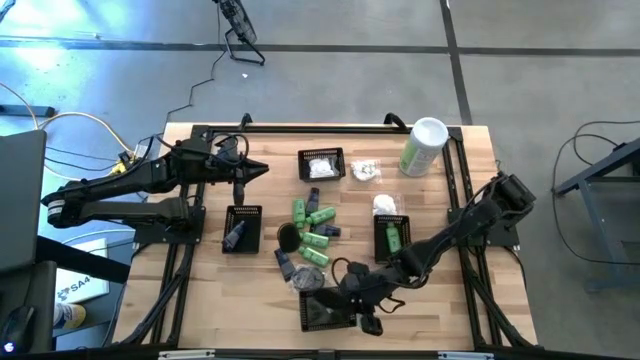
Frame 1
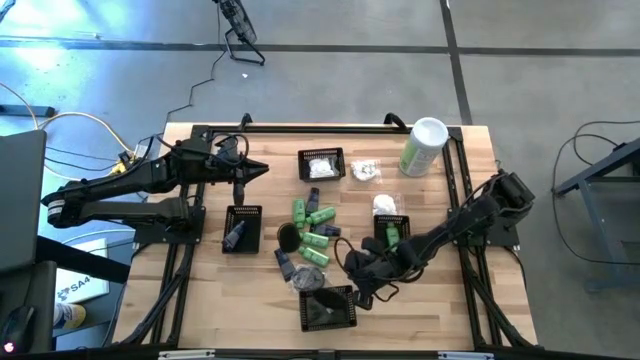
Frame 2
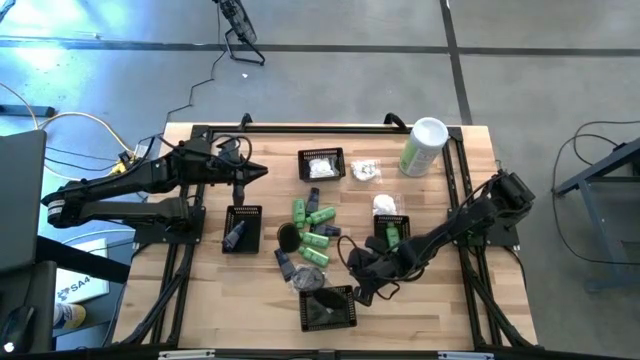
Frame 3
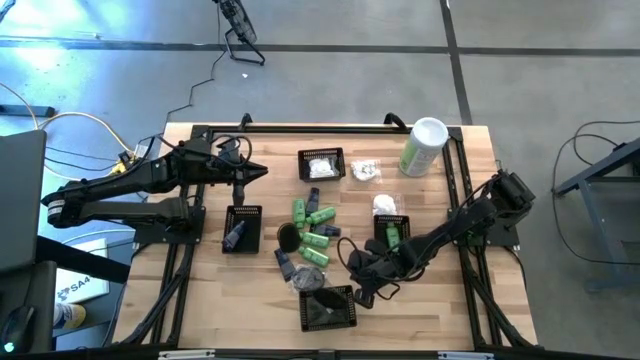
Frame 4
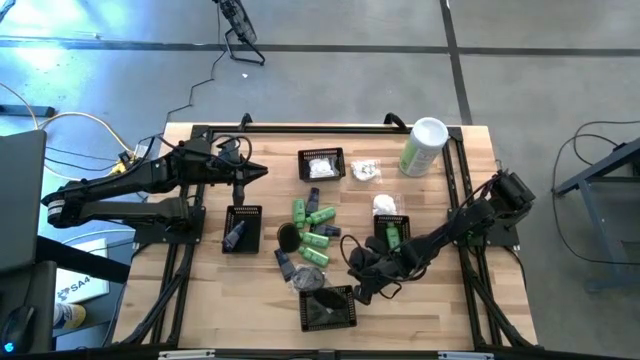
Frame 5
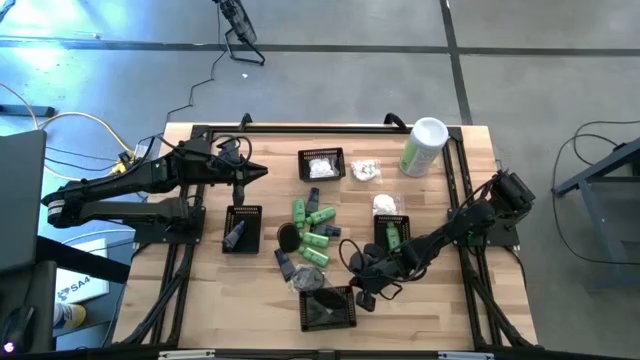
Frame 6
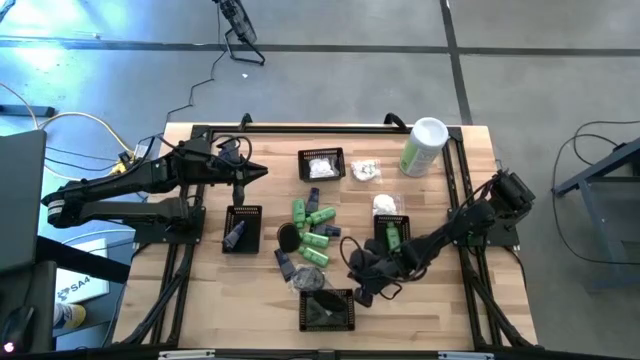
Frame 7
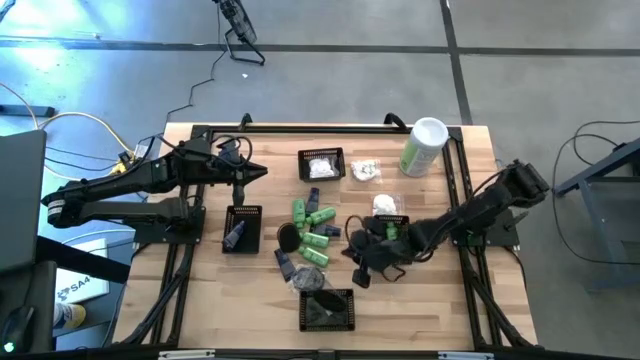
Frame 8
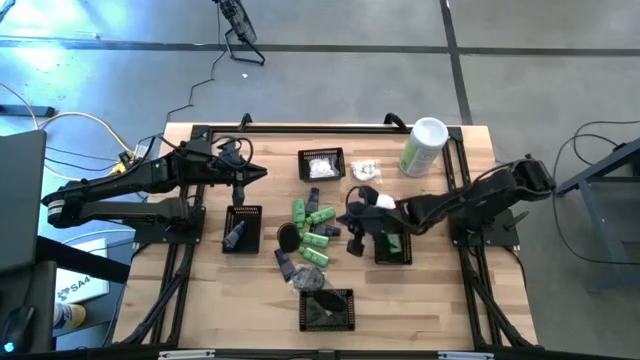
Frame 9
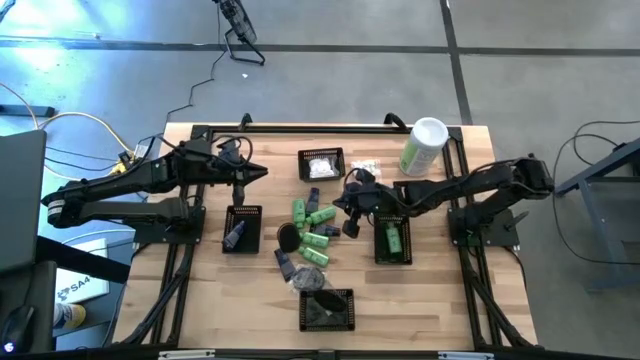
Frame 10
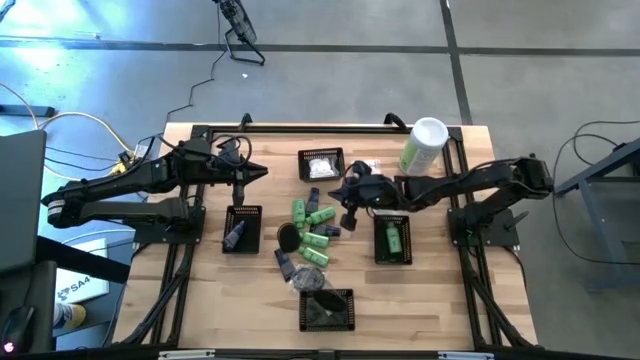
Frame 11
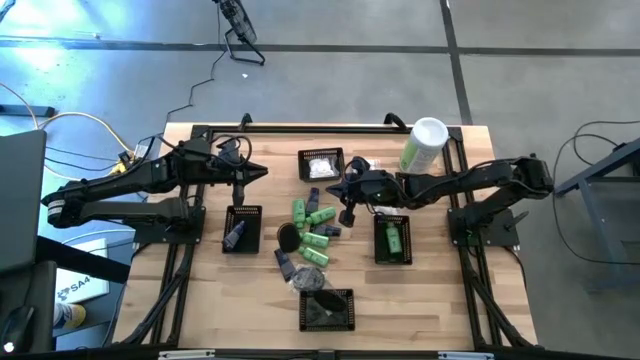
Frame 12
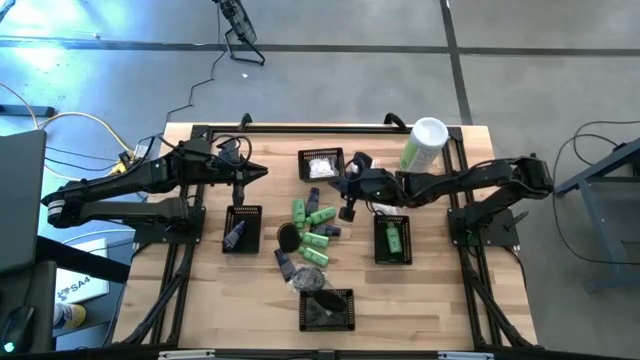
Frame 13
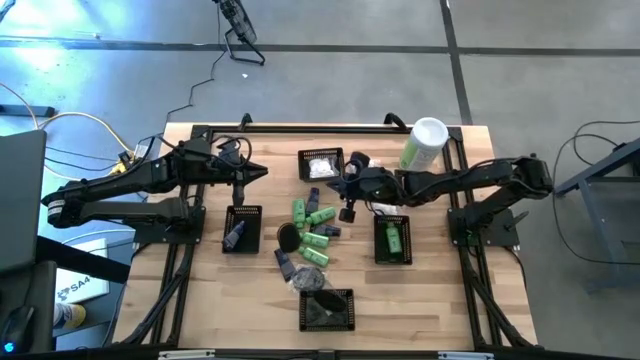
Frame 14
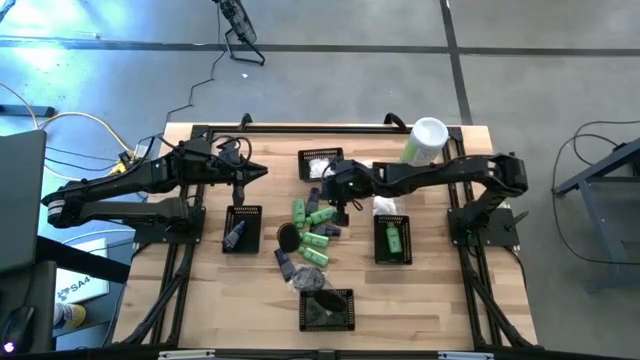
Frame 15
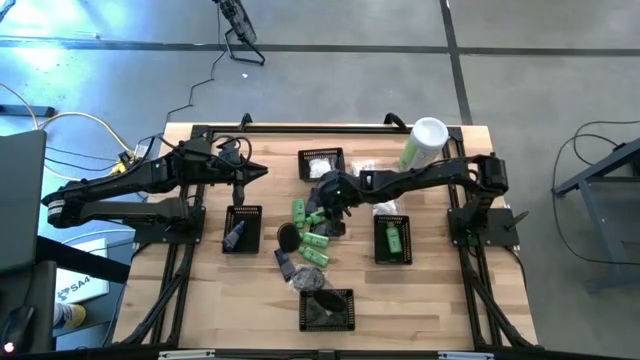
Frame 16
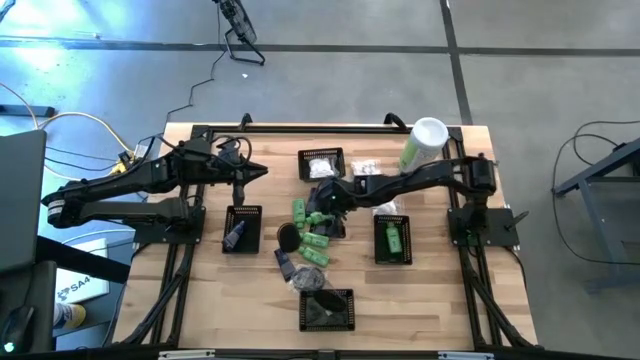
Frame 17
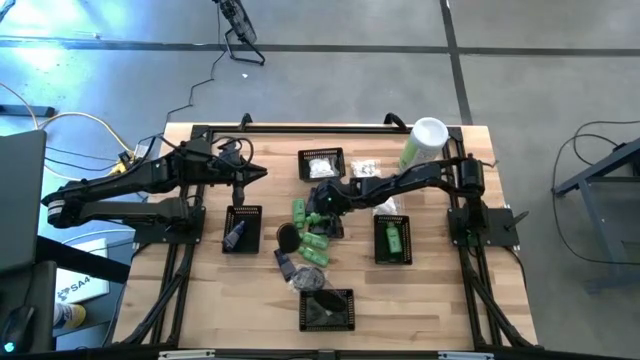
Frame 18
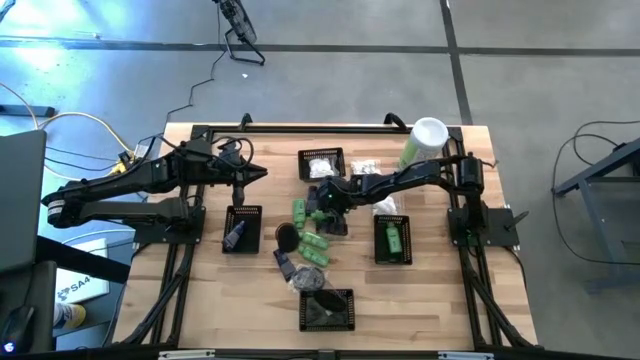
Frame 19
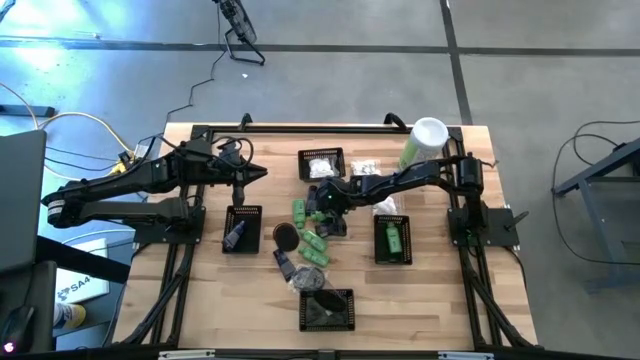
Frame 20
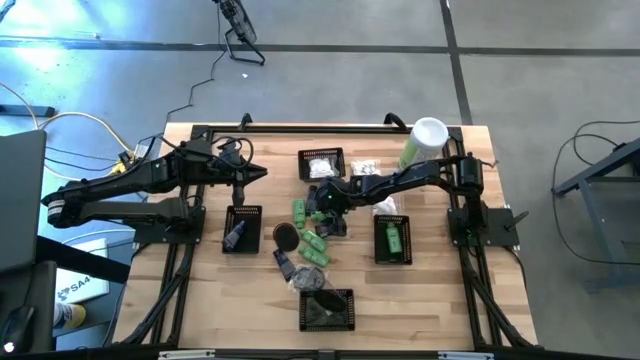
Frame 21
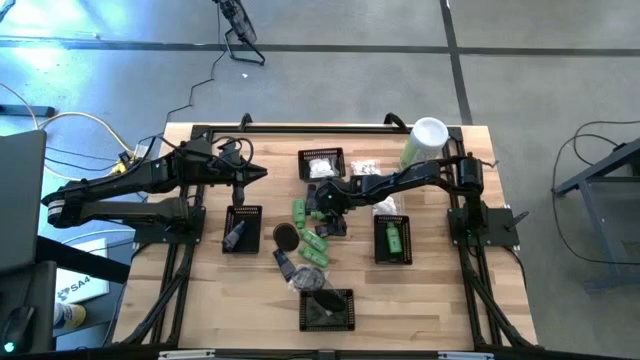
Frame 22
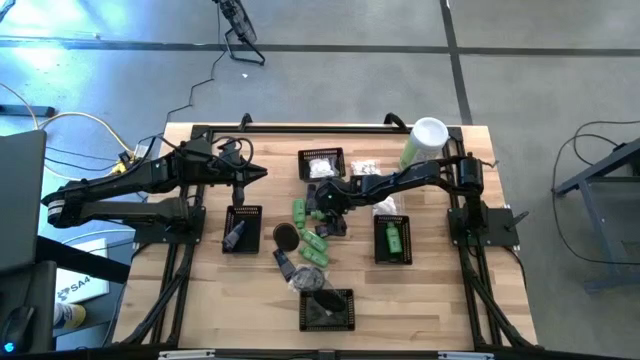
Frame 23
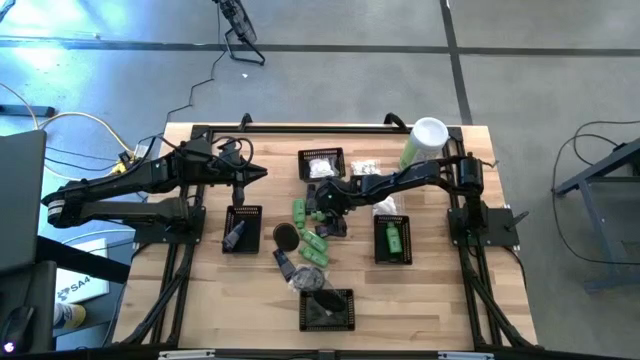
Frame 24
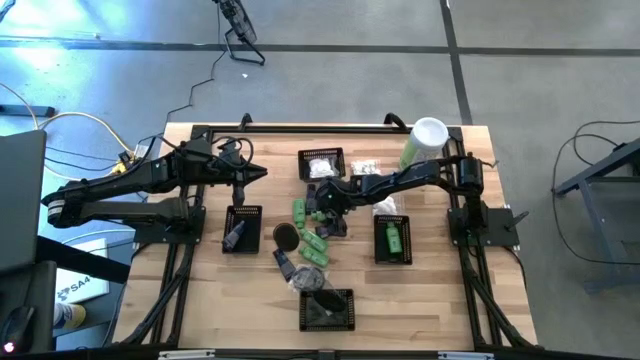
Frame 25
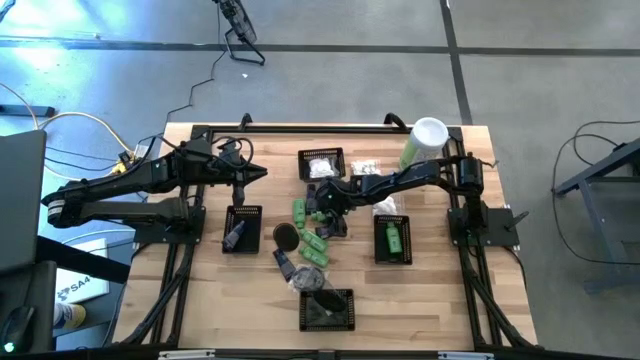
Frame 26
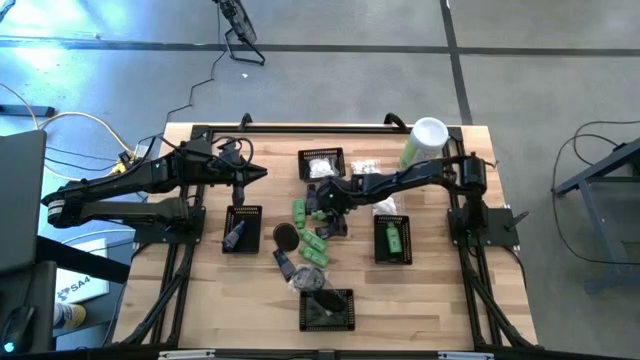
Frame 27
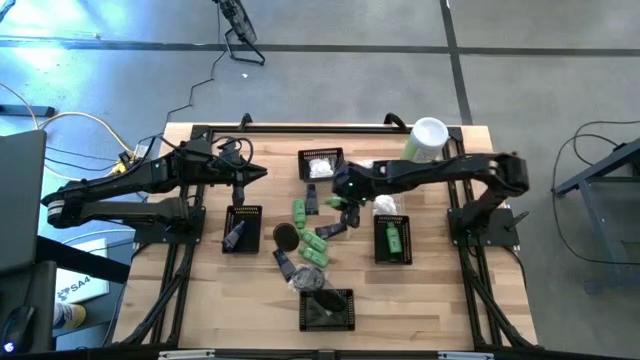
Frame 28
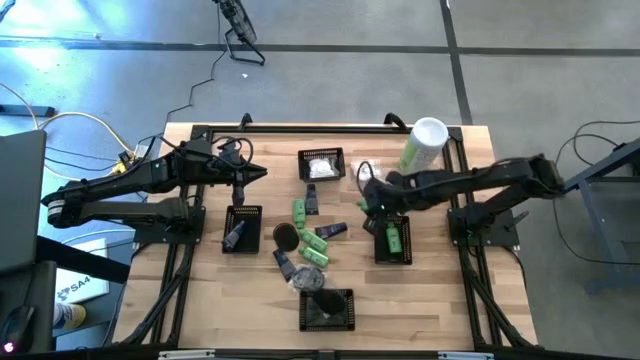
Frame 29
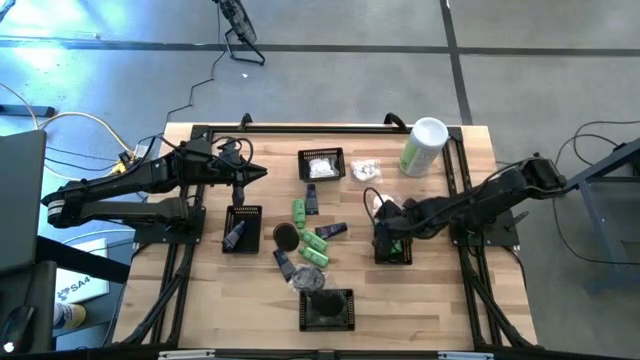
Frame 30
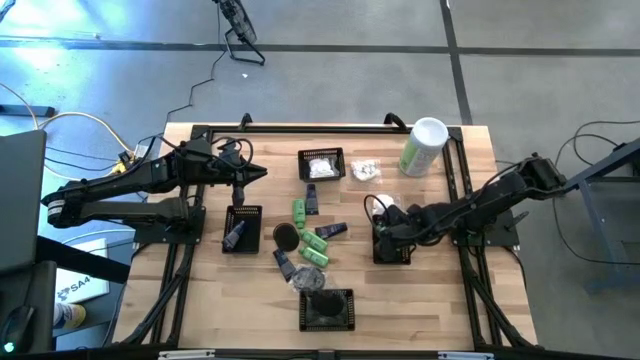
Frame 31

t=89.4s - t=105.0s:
Task: Pick & Place Travel size toiletries
Put the green bottle into the middle right black bin
